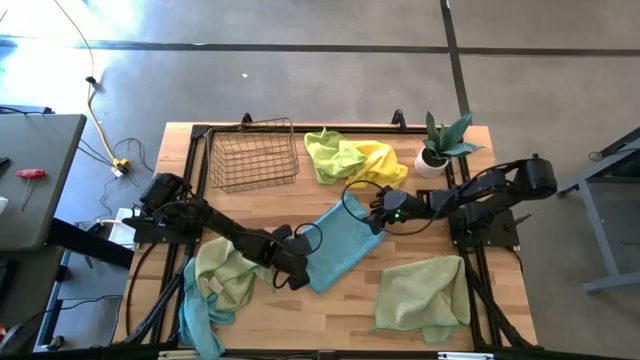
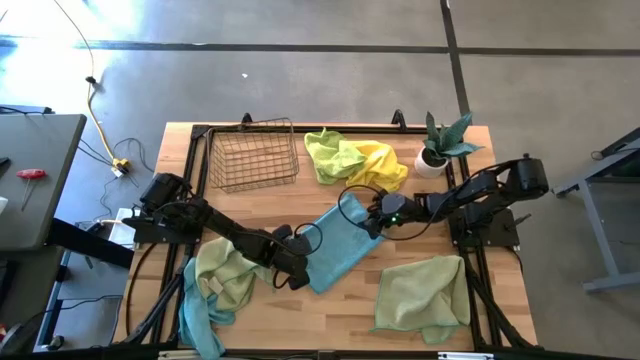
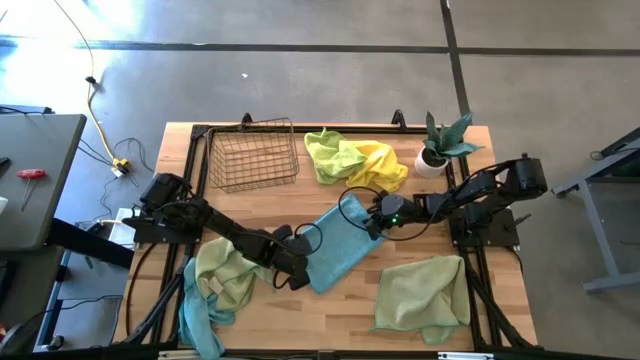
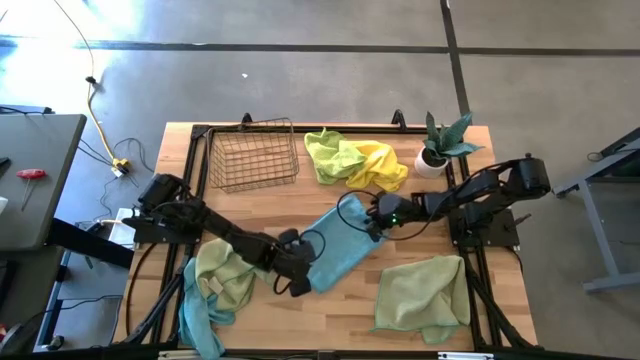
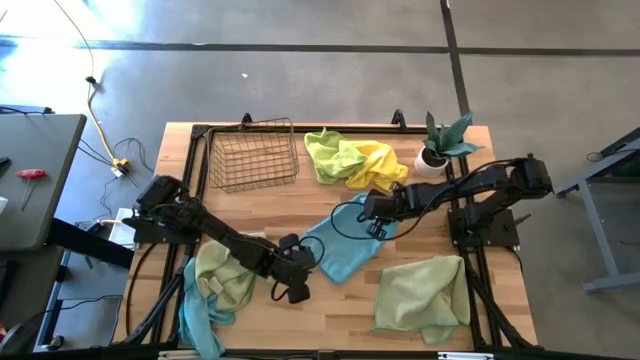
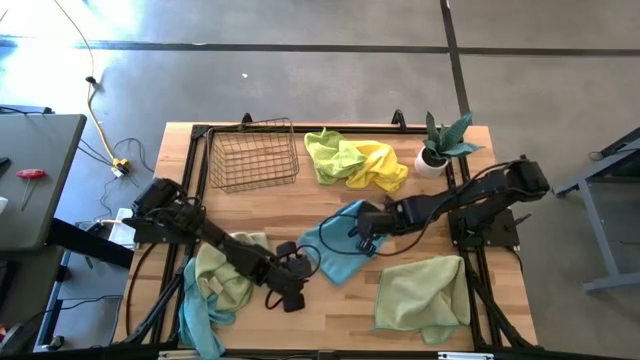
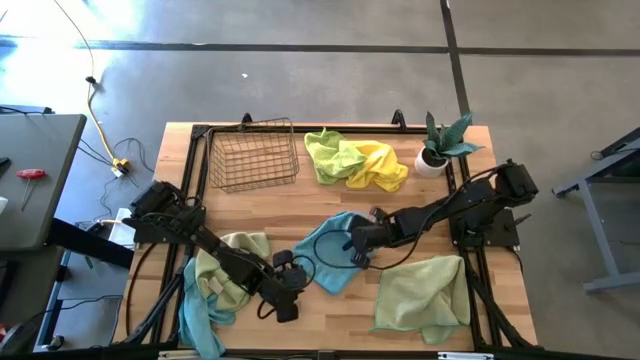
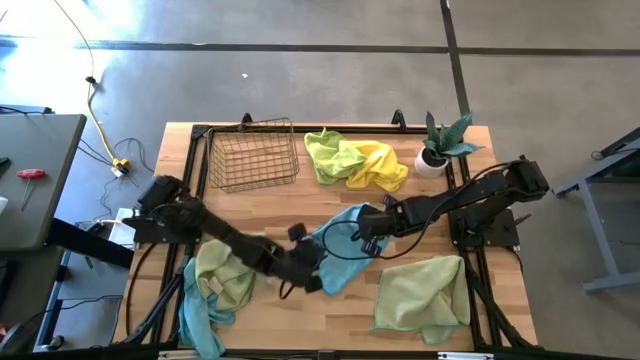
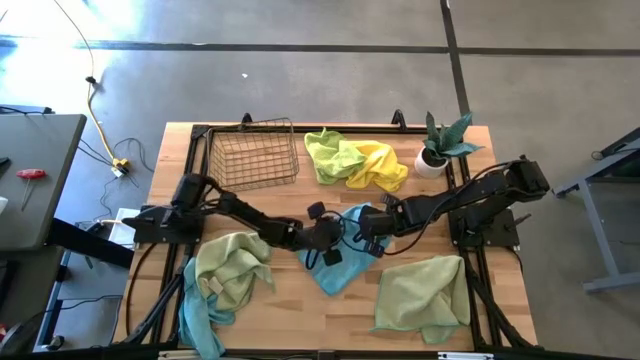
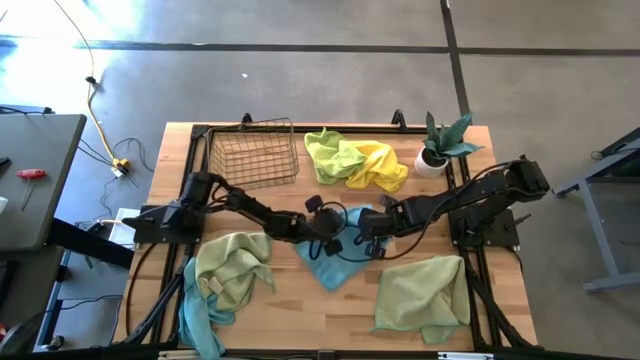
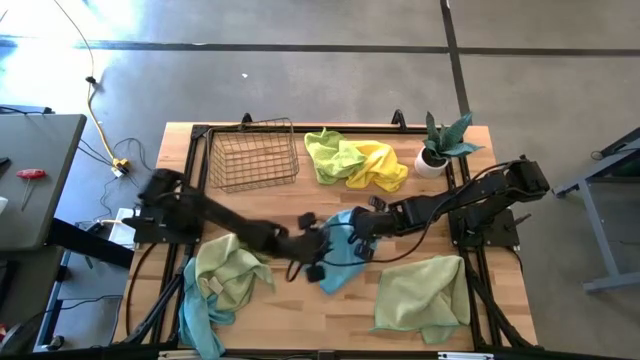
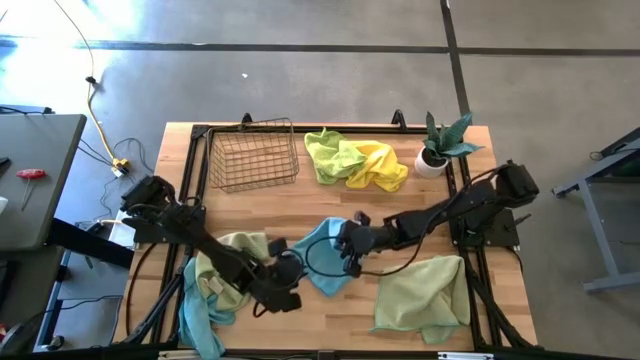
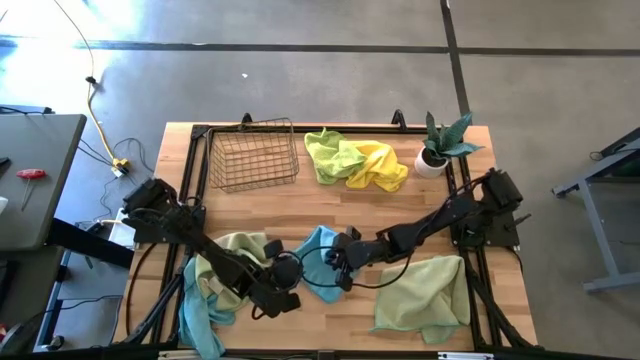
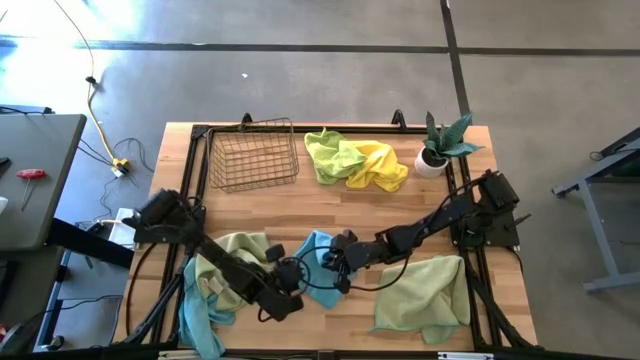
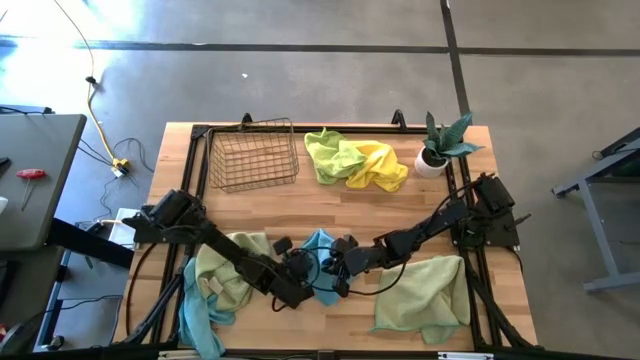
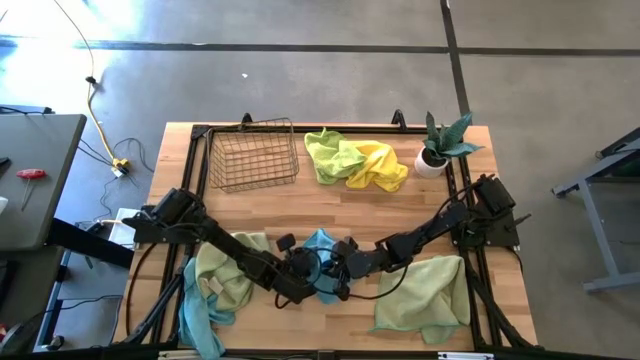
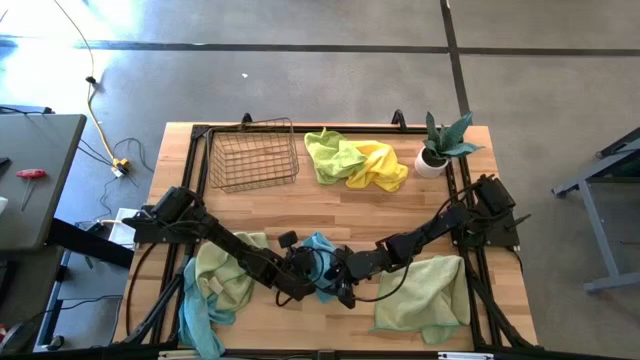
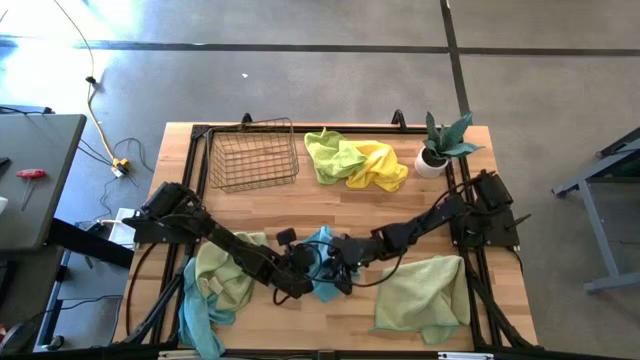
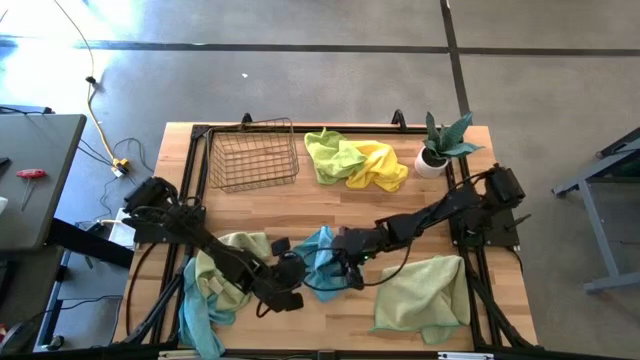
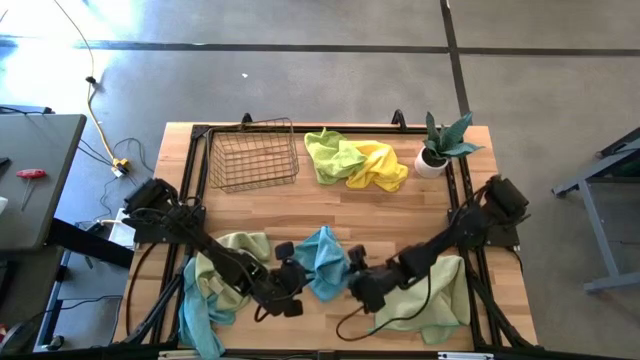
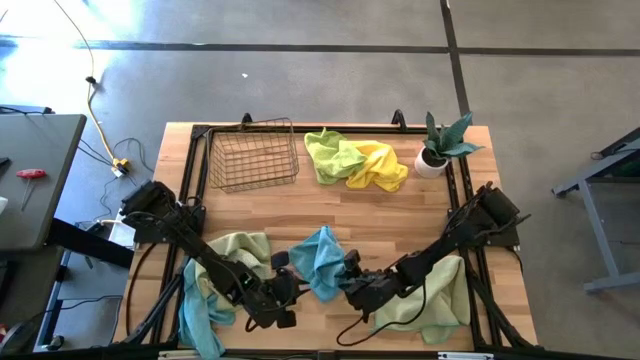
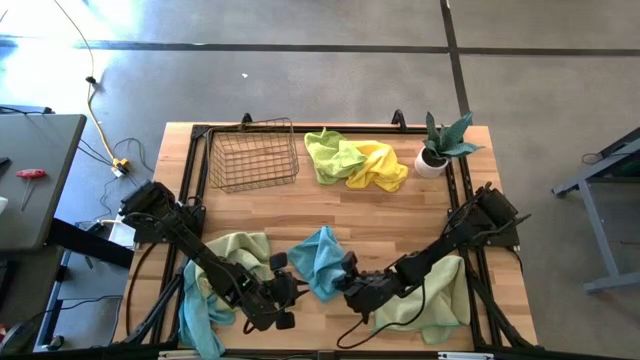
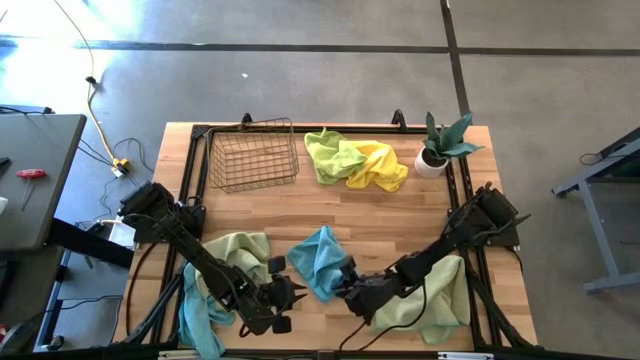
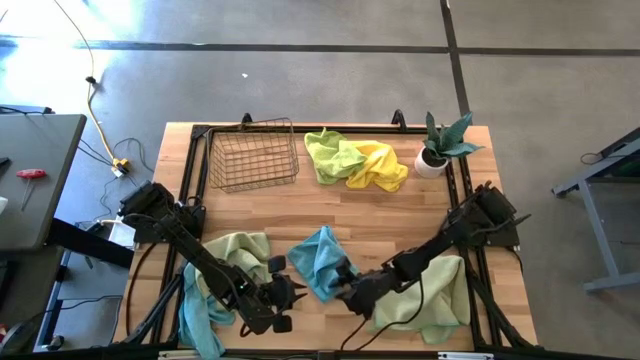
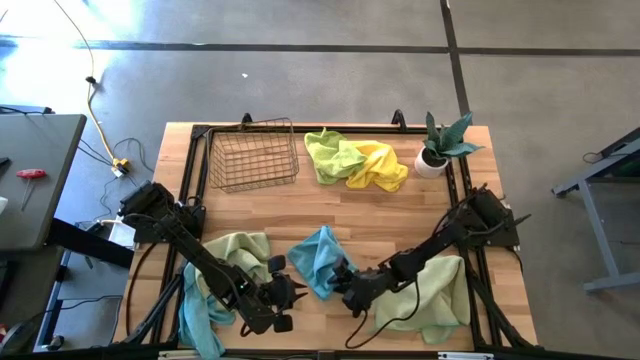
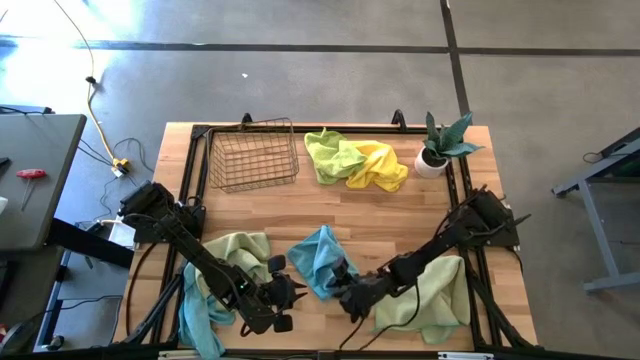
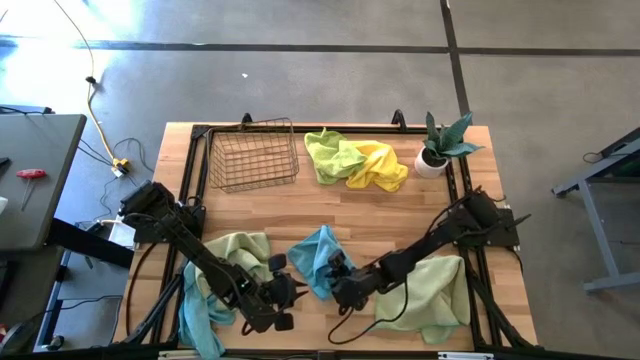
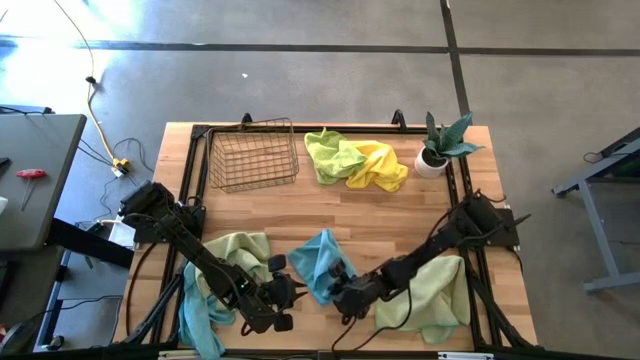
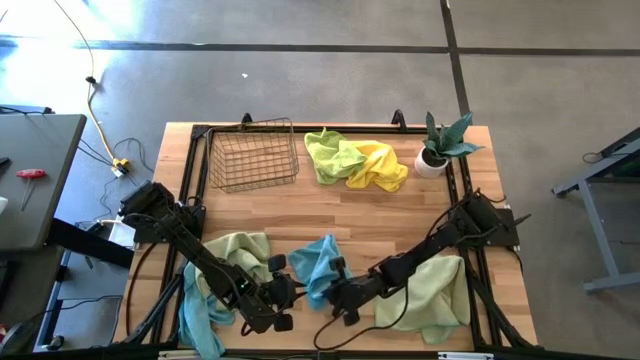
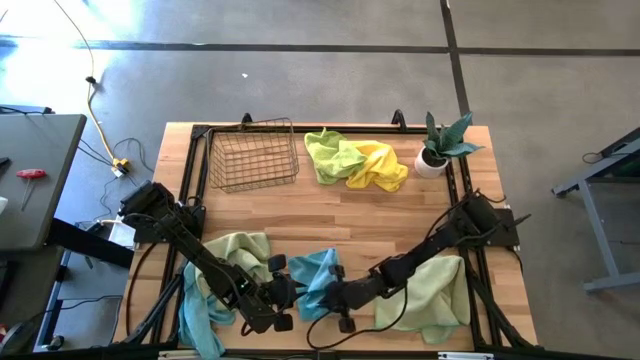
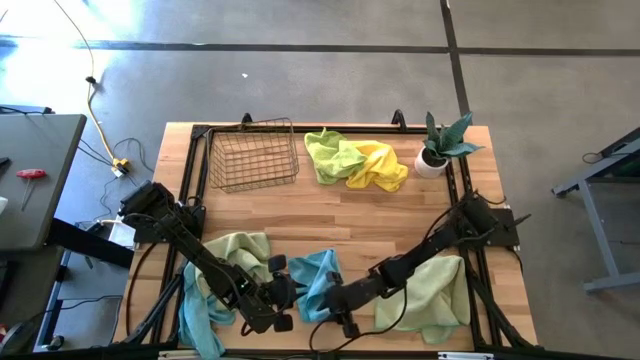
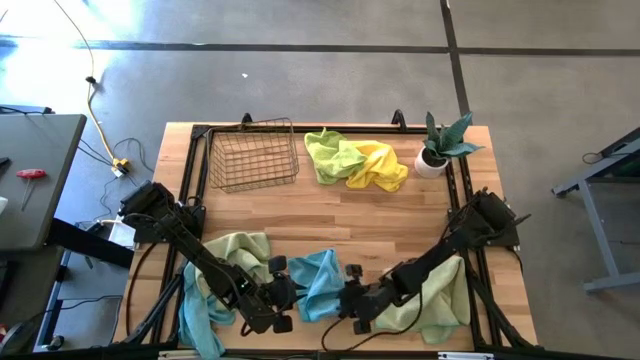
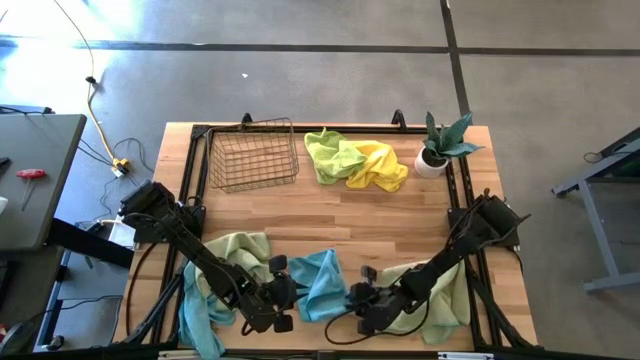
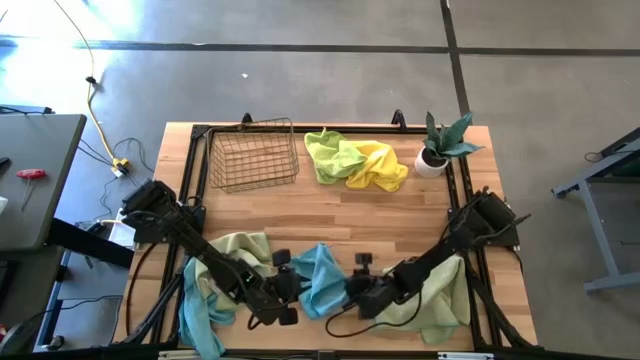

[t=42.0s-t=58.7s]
Task: Fold microfiber towels
Fold the right blue towel

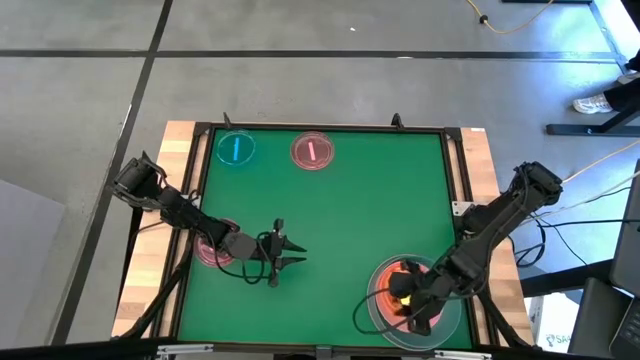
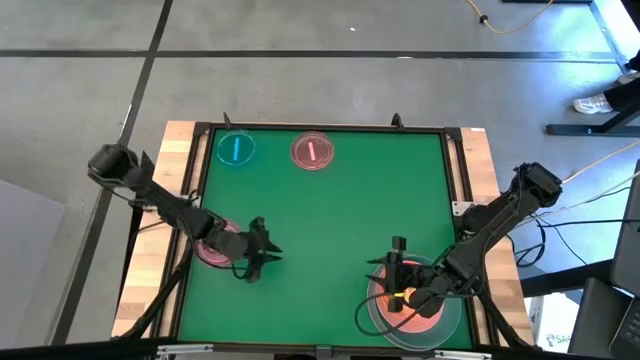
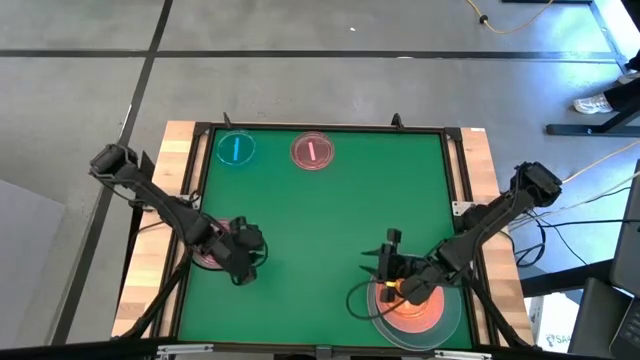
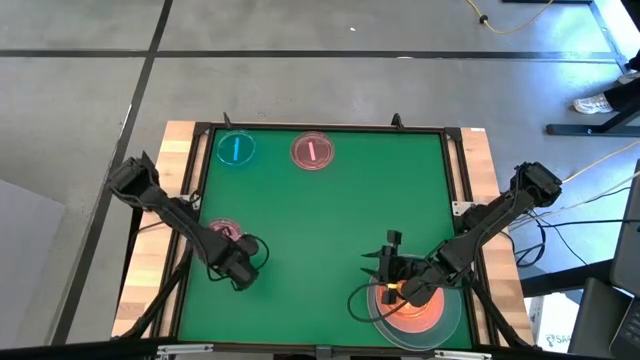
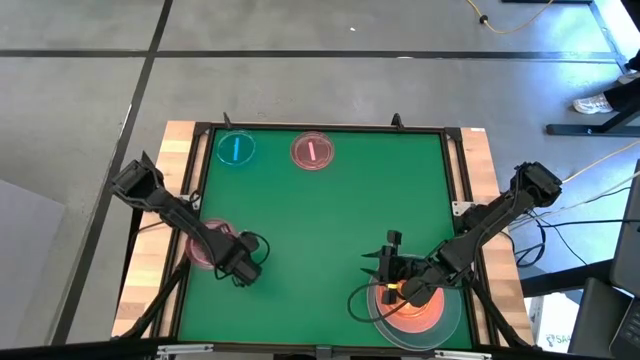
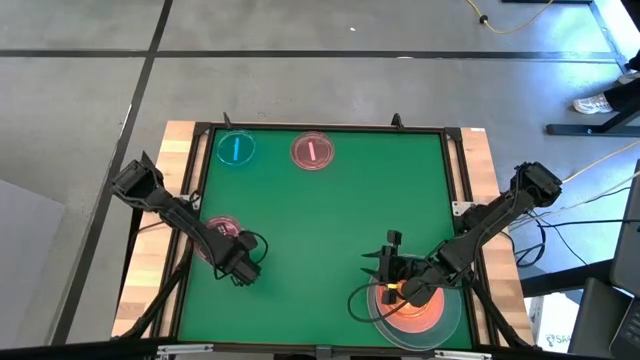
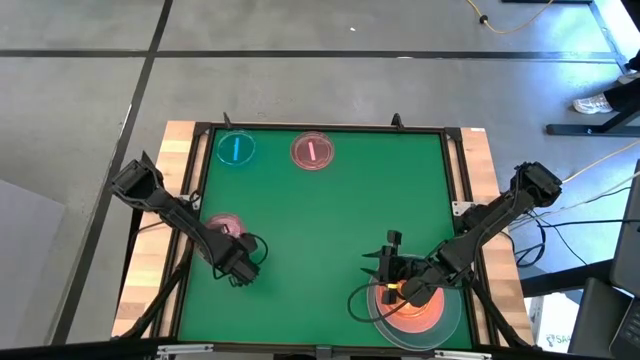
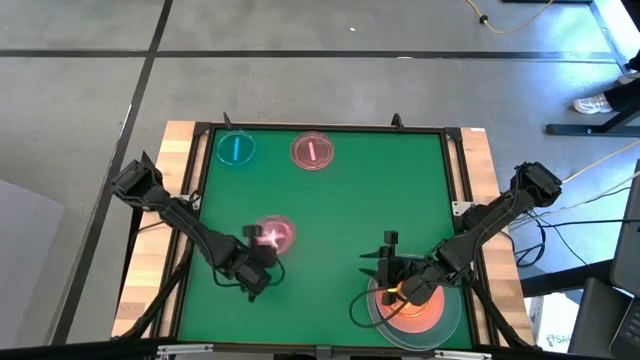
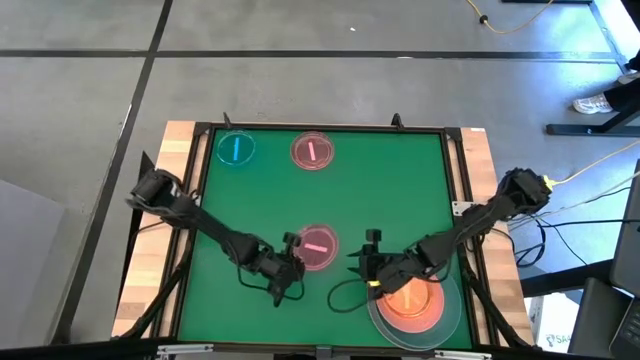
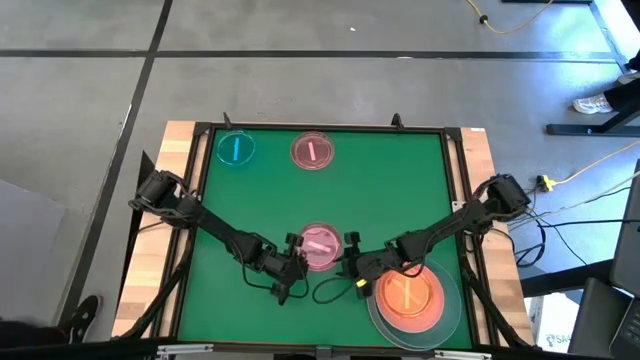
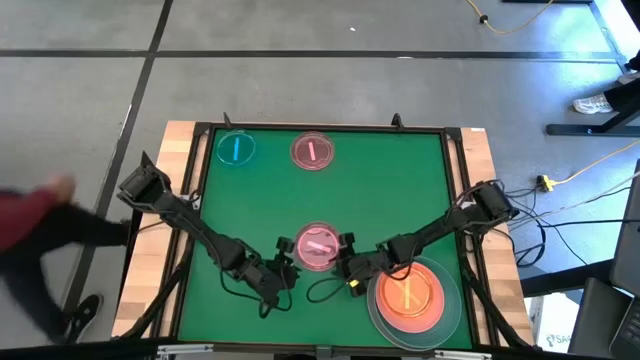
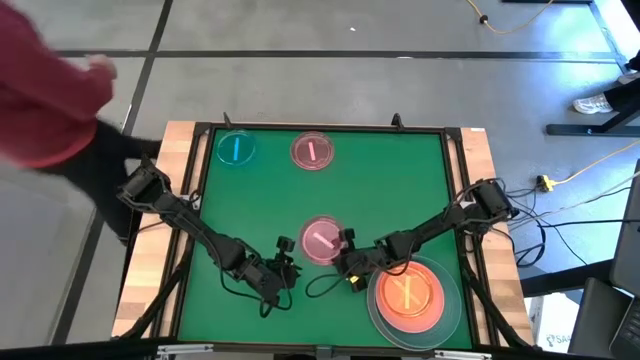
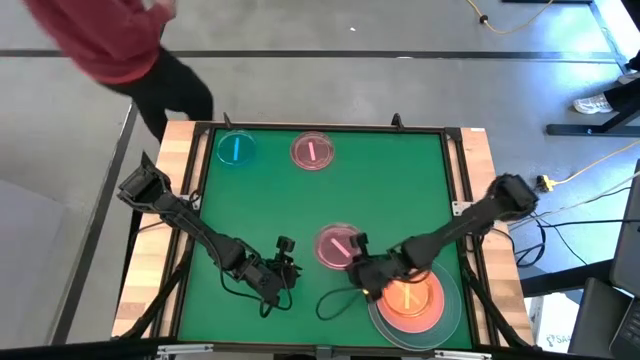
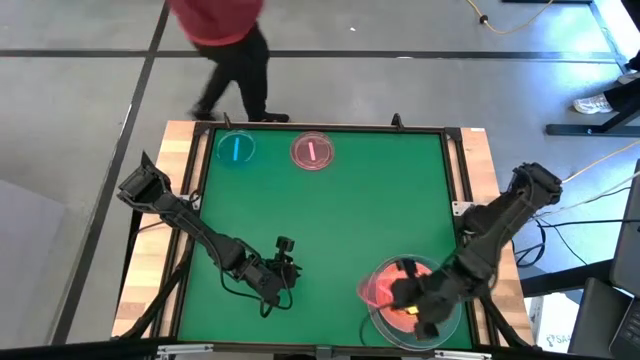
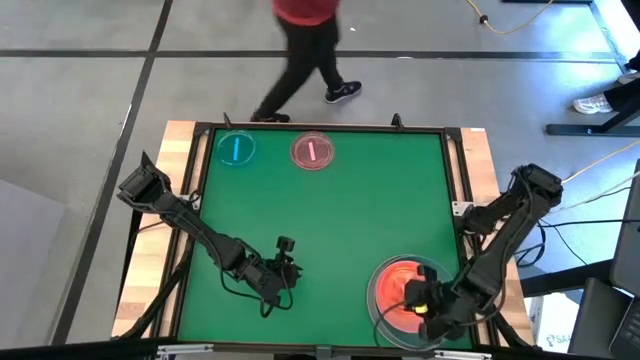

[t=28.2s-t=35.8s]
Task: Stack plastic plates
Stack the bottom transparent pink plate on top of the transparent orange plate
